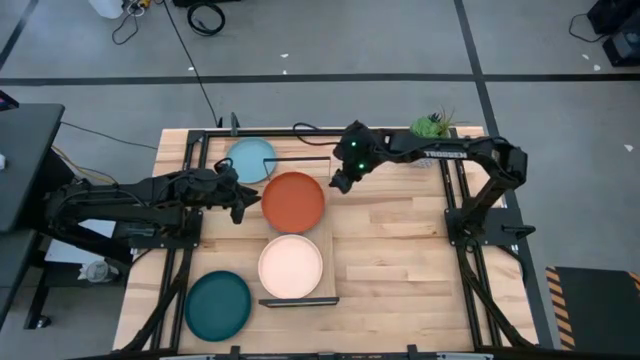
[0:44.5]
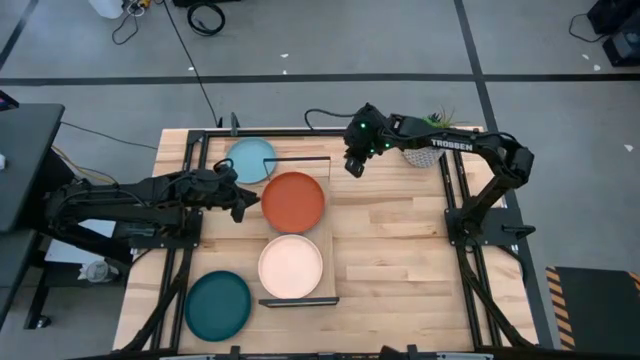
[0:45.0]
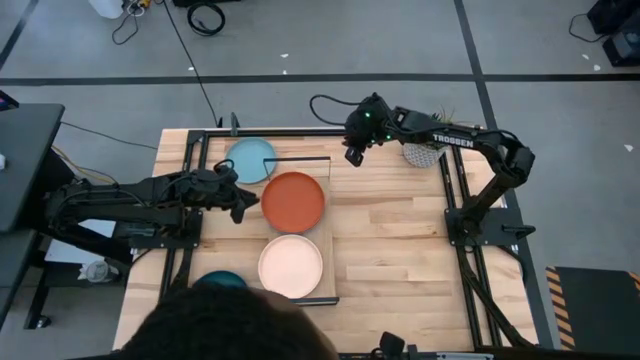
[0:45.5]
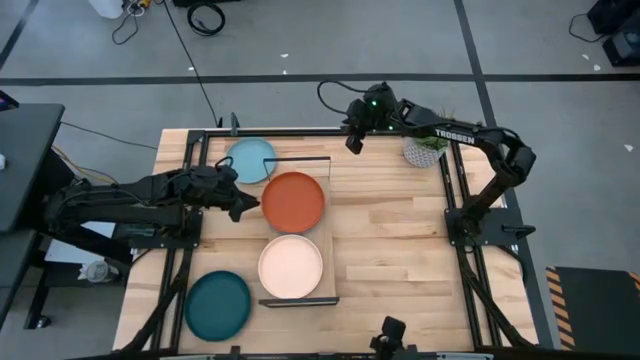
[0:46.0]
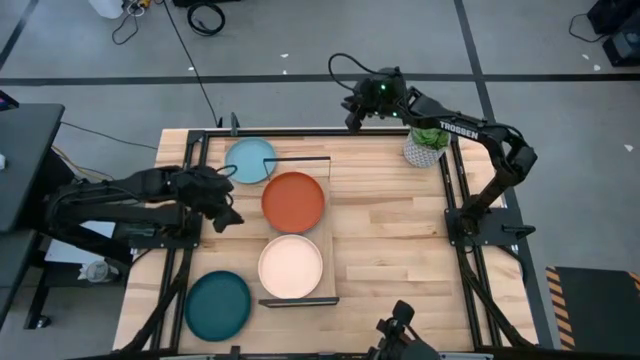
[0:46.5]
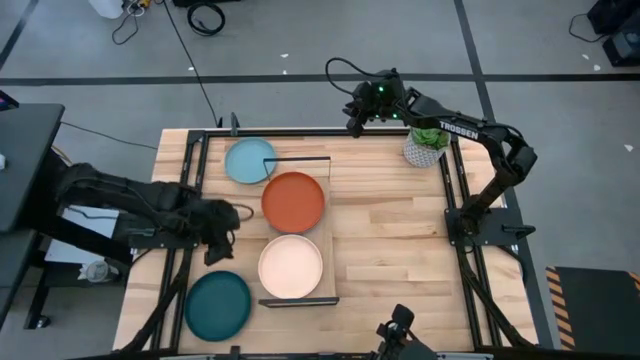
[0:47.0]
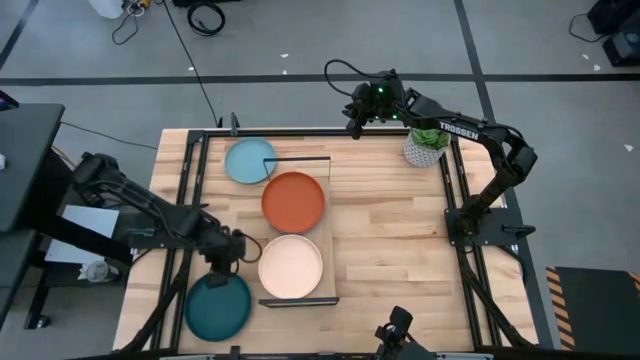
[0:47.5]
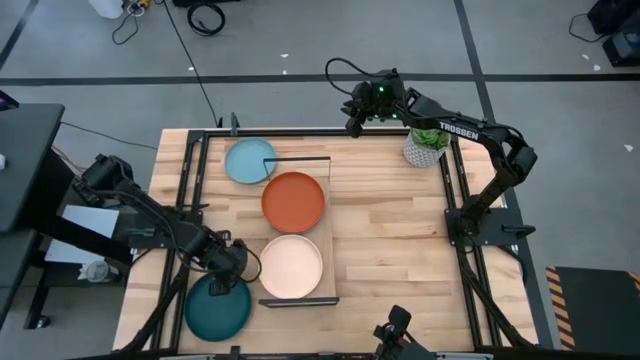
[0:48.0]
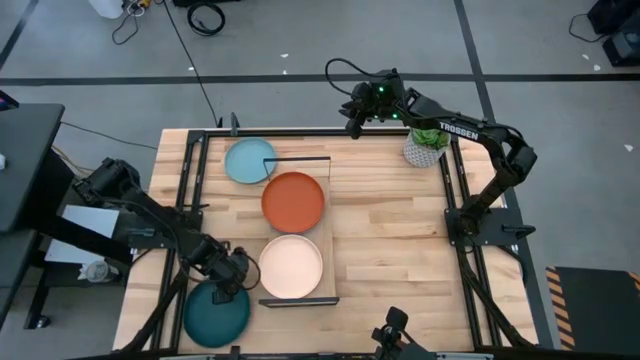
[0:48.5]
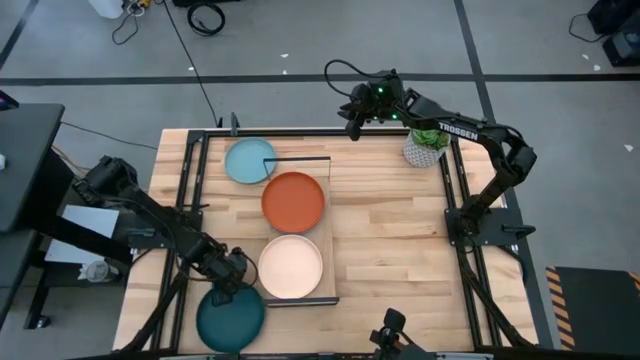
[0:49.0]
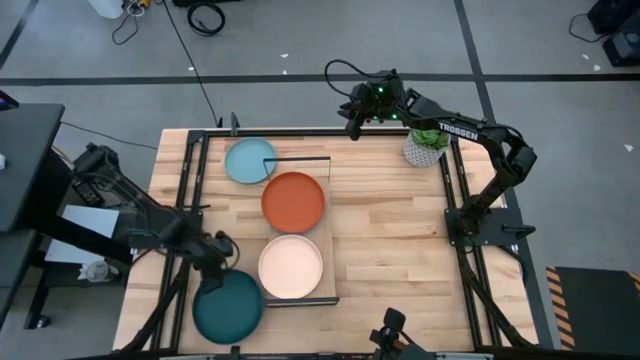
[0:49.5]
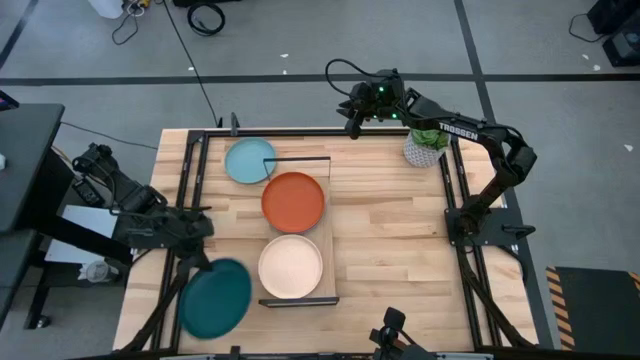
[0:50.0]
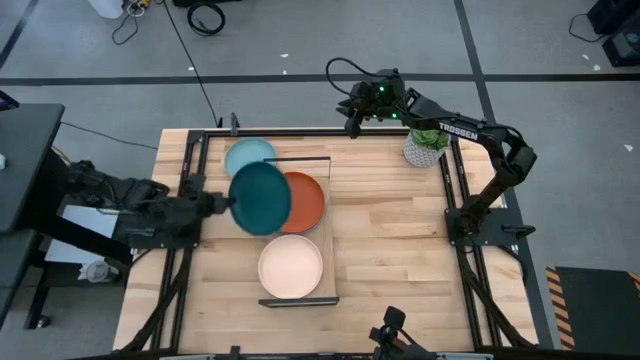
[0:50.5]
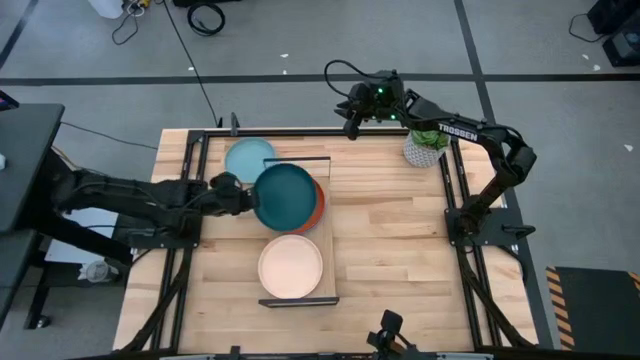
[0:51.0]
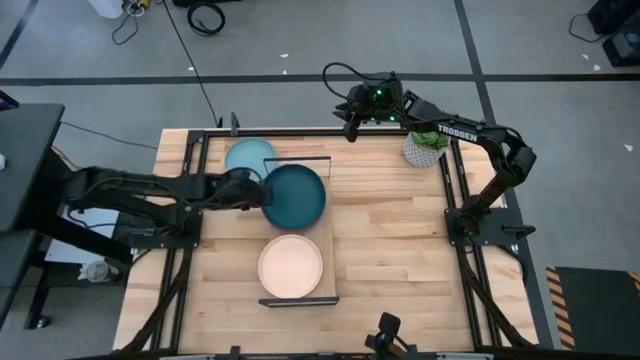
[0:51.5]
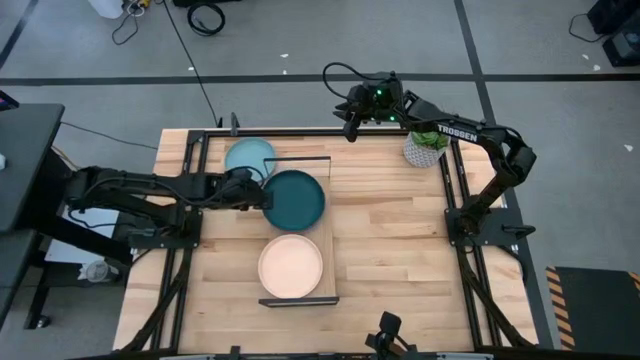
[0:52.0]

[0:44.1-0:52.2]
Task: Place and stack plates onto a shelf
Stack the green plate on top of the orange plate on the shelf

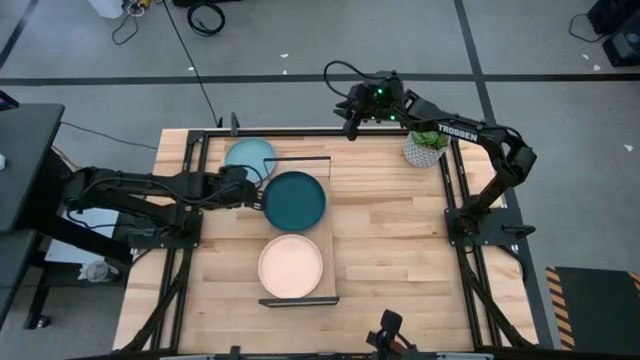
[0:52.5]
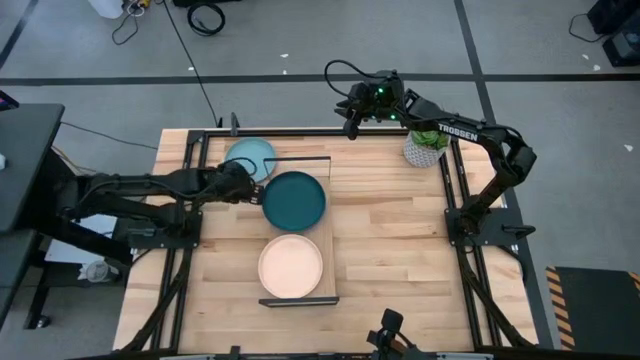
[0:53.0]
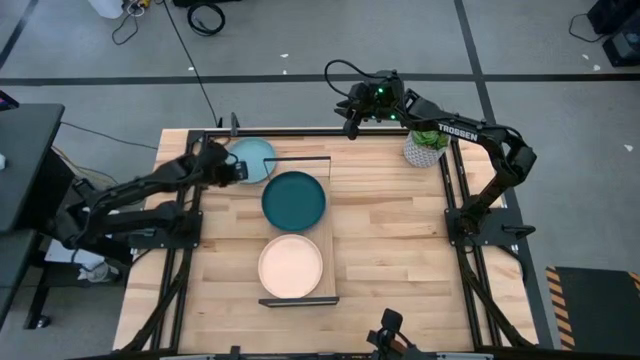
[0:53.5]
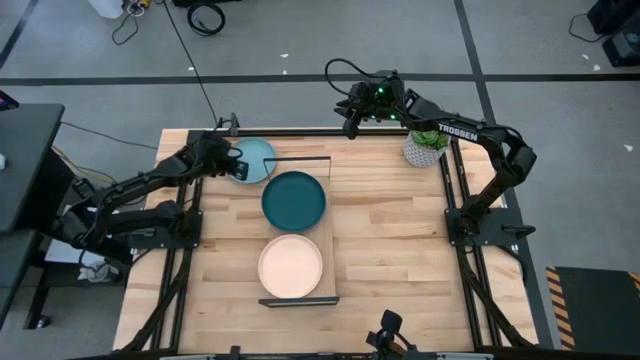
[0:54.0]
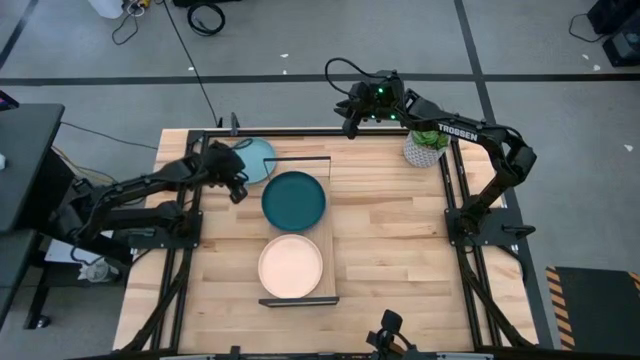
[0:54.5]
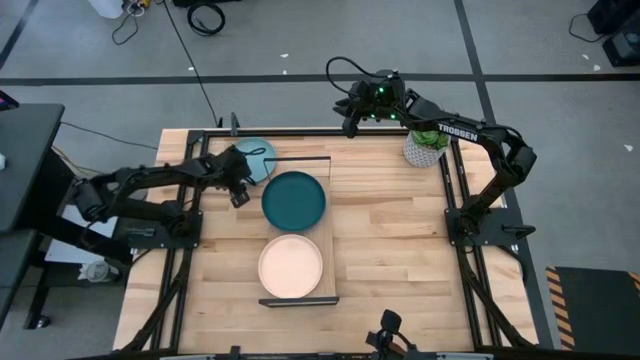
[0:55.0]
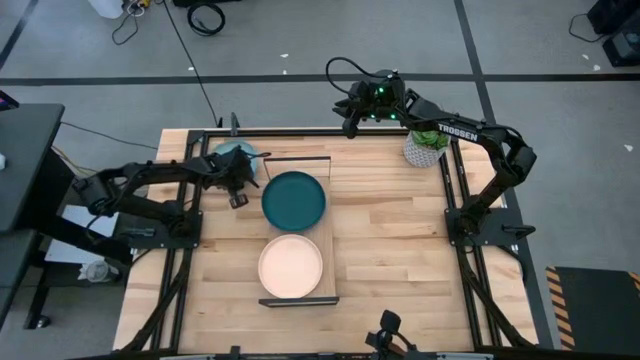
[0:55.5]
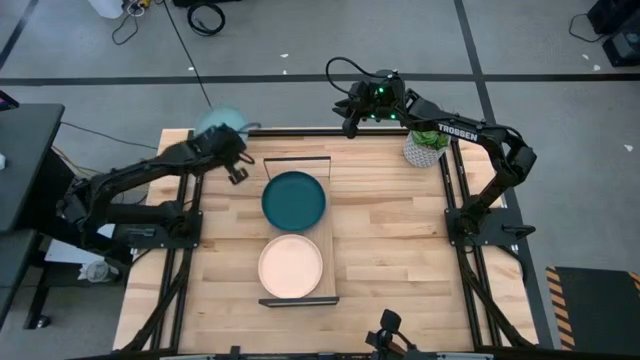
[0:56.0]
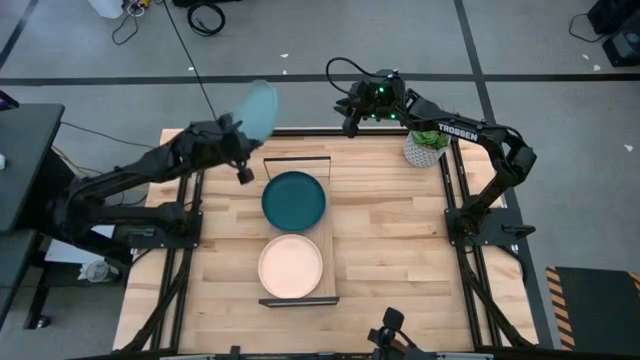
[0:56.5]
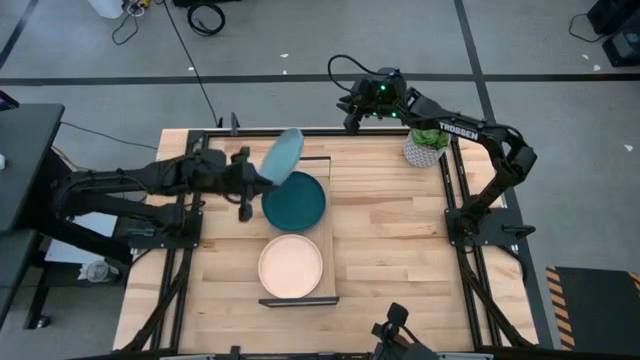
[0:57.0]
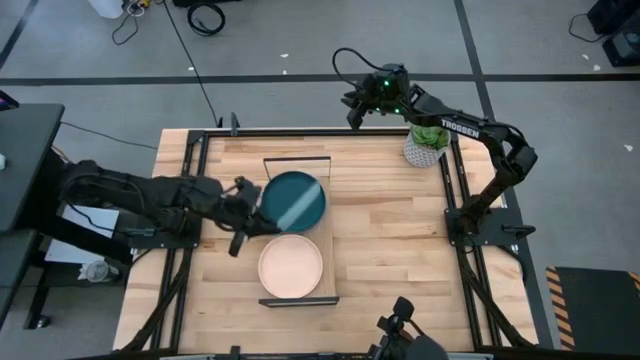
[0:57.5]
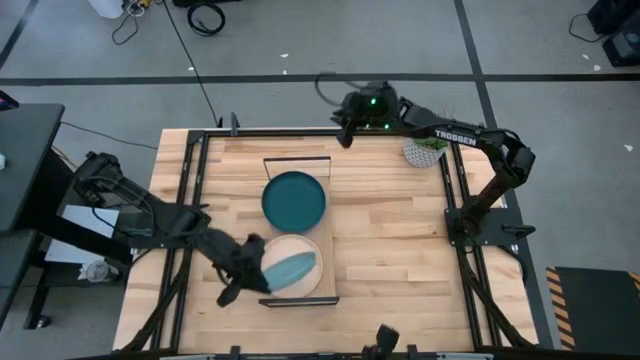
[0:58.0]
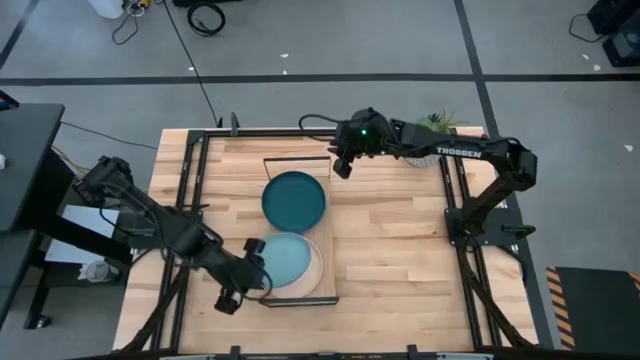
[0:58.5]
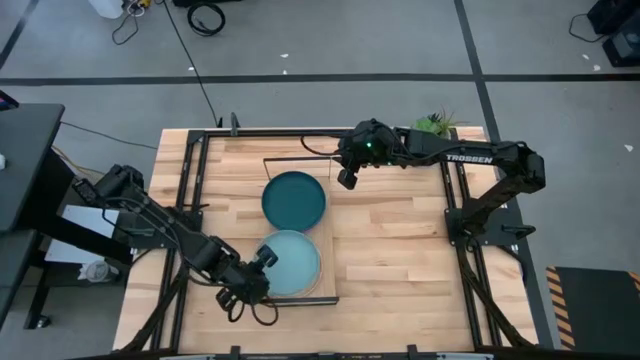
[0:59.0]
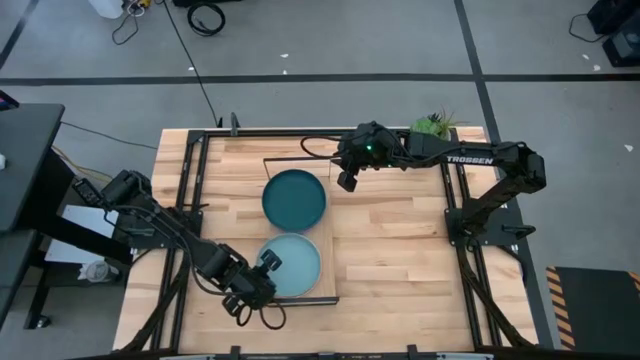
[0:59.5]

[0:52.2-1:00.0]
Stack the light green plate on top of the light orange plate on the shelf

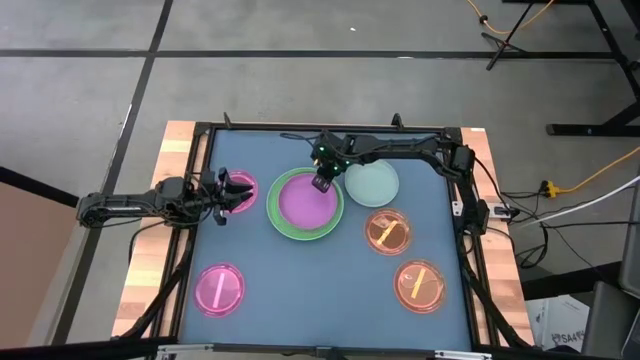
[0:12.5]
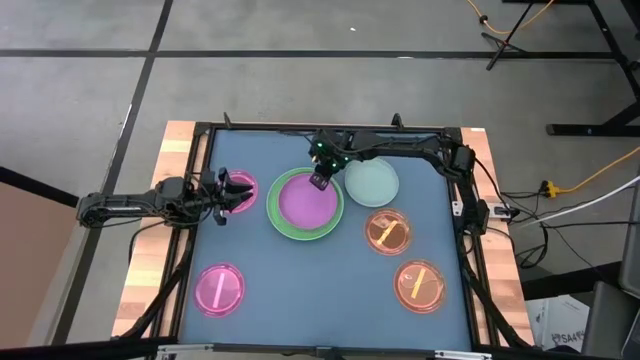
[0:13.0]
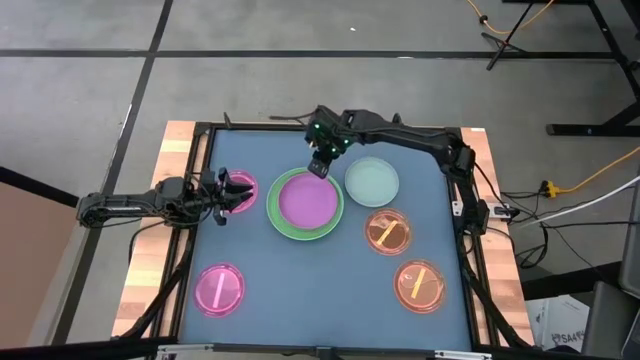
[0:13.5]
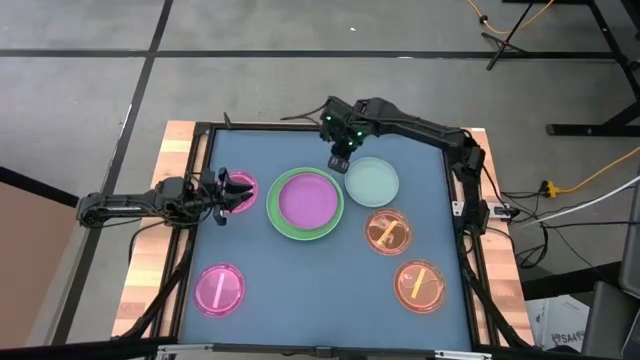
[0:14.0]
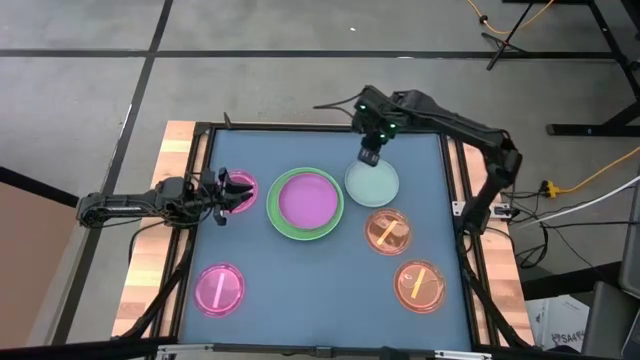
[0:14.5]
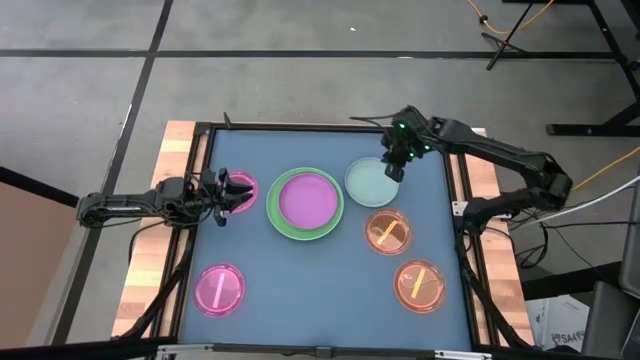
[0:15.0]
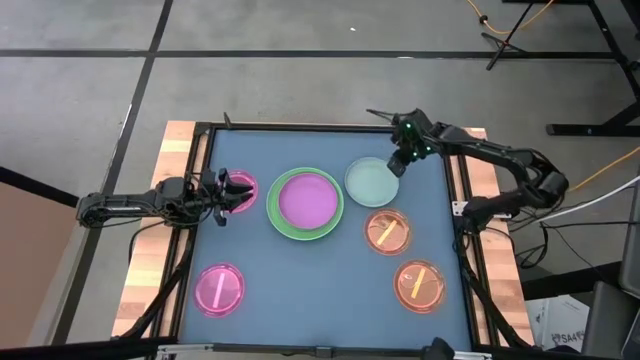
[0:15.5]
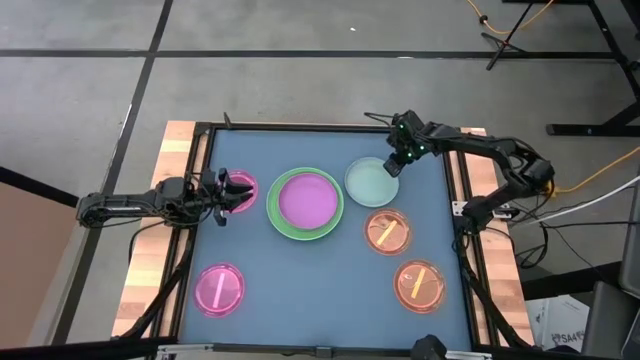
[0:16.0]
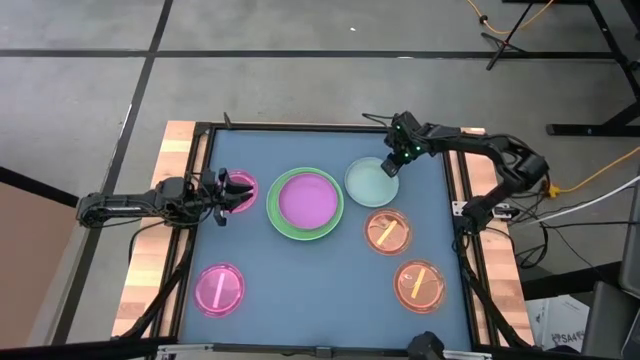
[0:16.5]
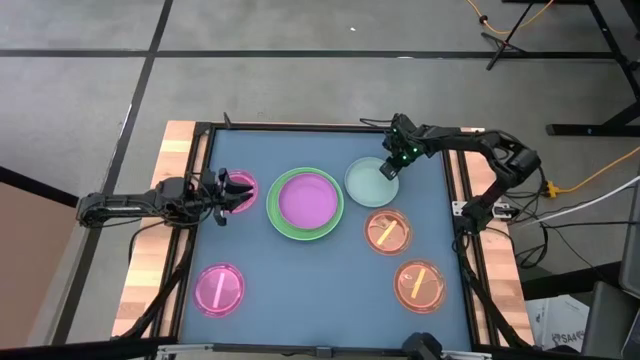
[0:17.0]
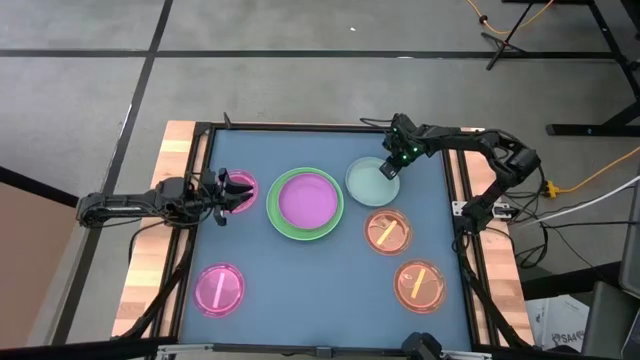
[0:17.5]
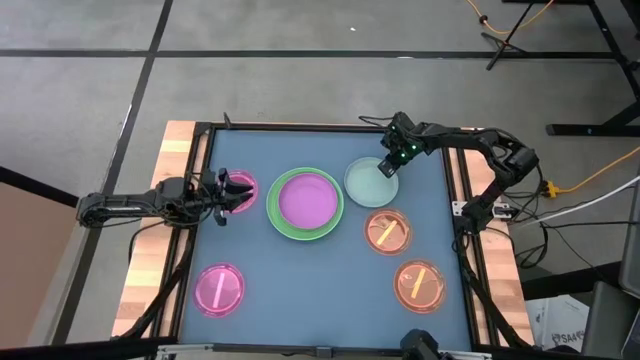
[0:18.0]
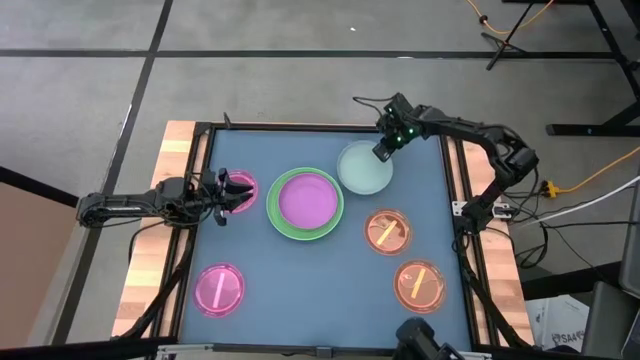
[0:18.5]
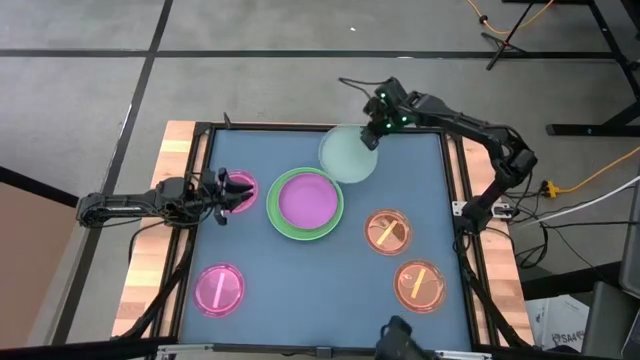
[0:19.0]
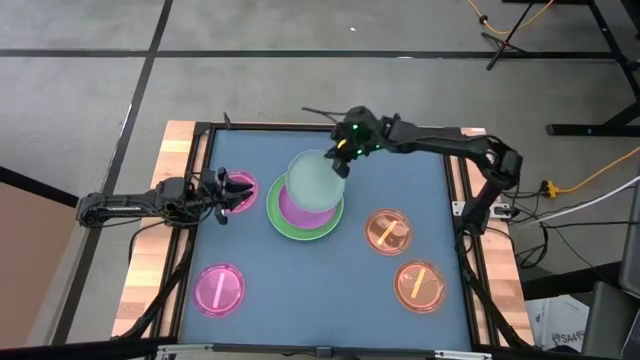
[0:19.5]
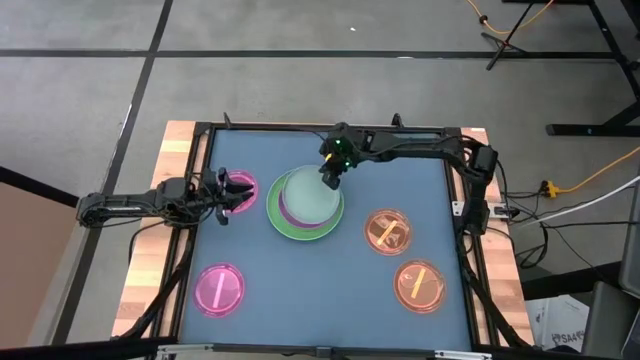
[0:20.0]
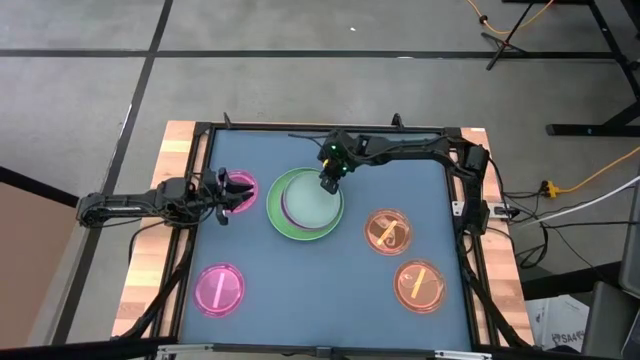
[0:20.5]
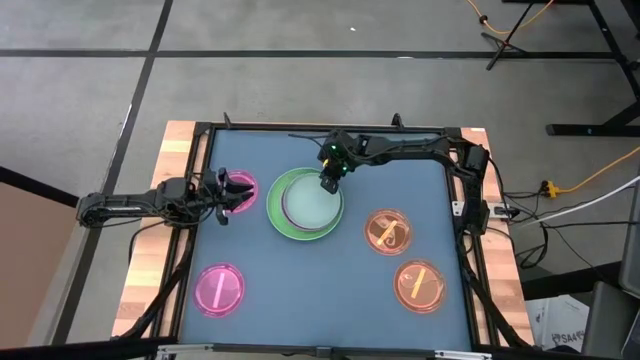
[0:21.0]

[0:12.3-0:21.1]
Task: Stack plastic plates
Stack the blue plate on the pink plate
